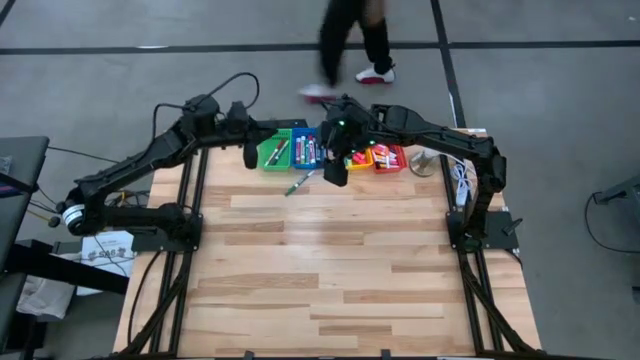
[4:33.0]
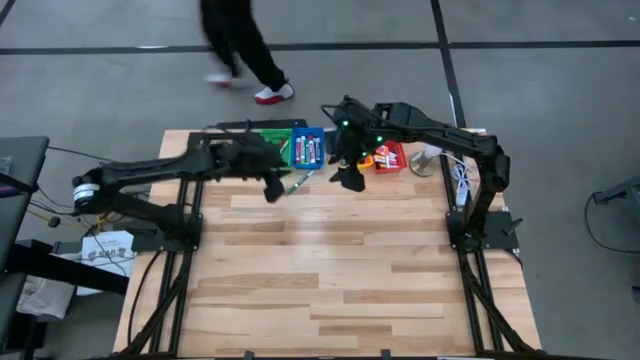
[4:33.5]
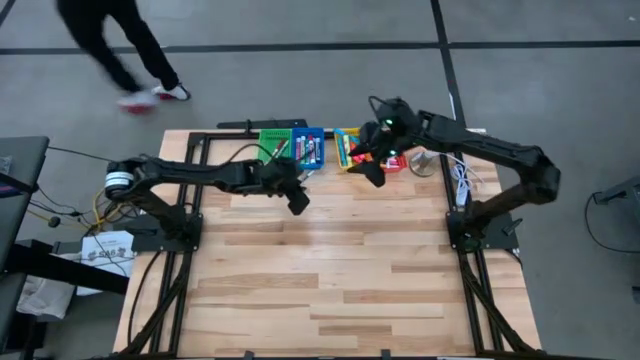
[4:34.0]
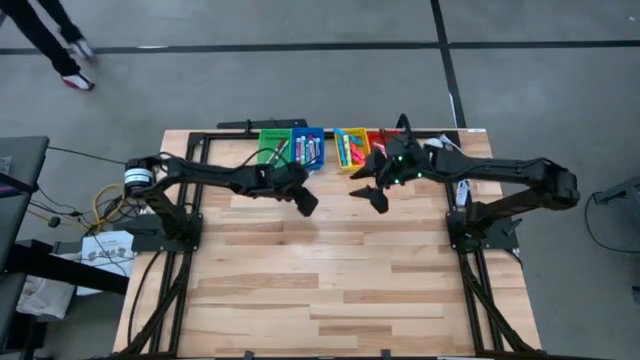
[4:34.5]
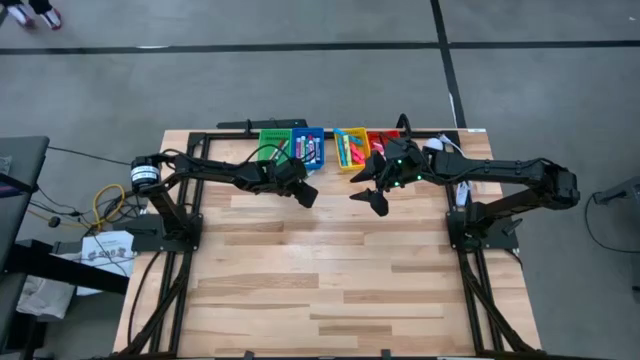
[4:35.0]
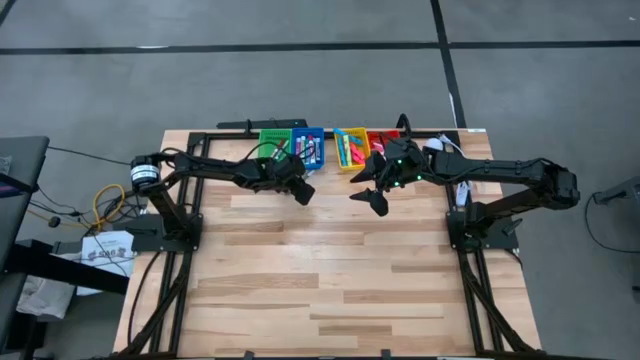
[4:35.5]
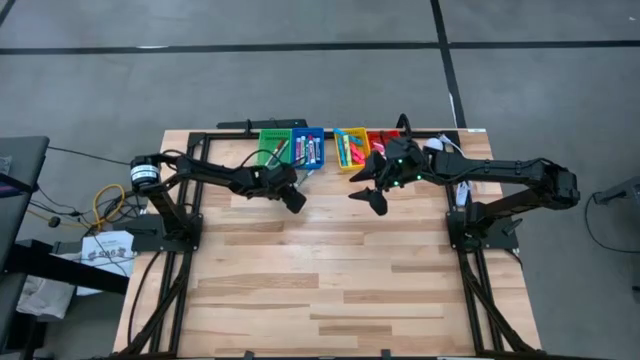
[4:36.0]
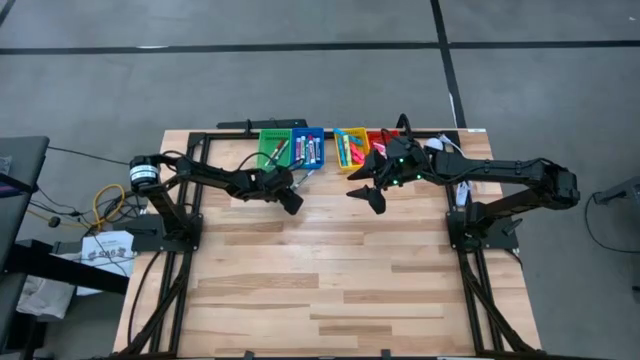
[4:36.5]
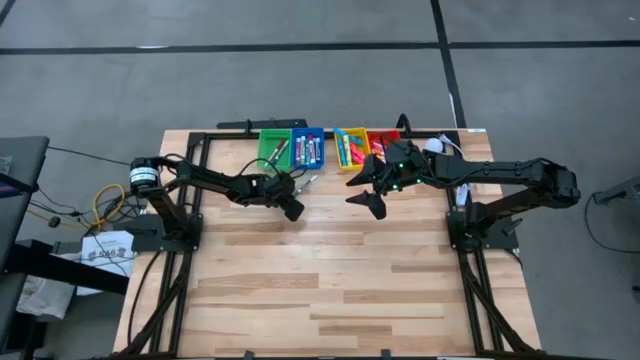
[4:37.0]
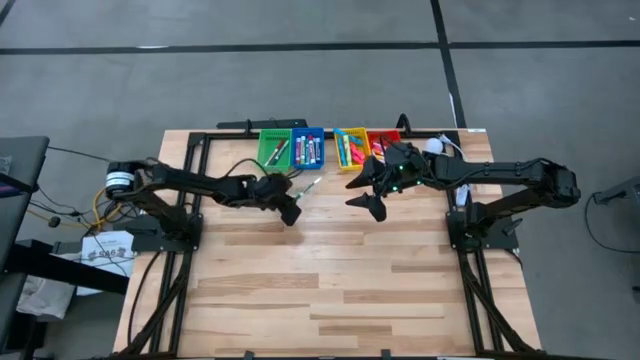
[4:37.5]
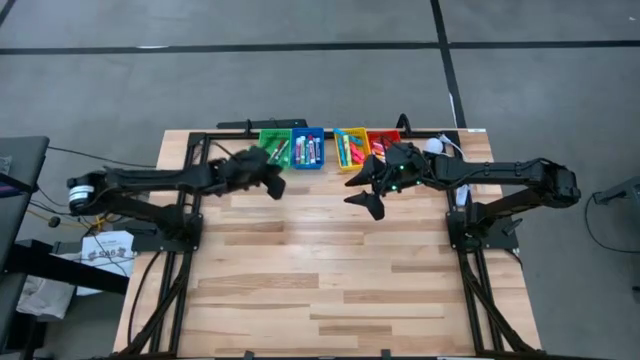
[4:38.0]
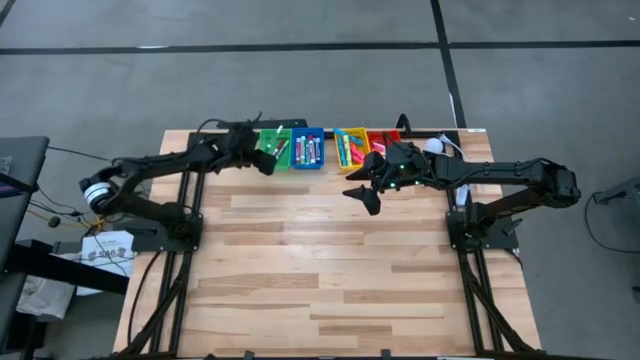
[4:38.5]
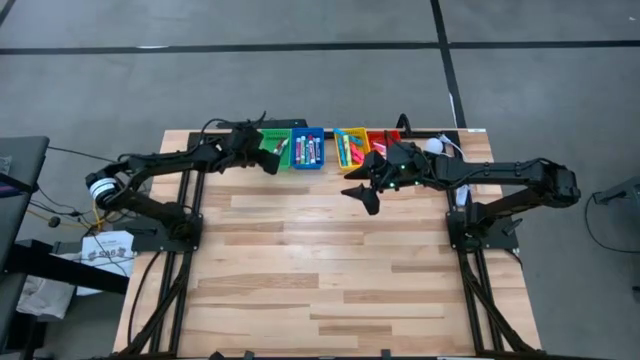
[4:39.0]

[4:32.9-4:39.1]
Task: Pick & Place Markers
Put the red dry erase marker into the green basket

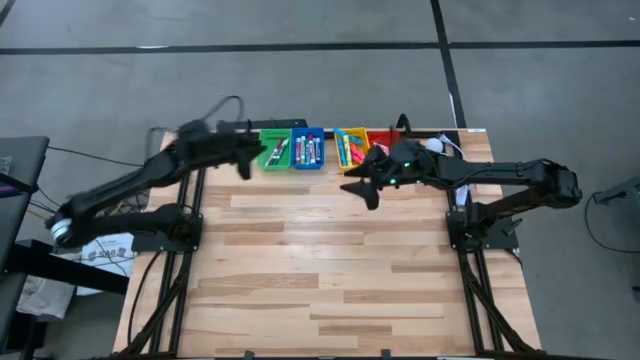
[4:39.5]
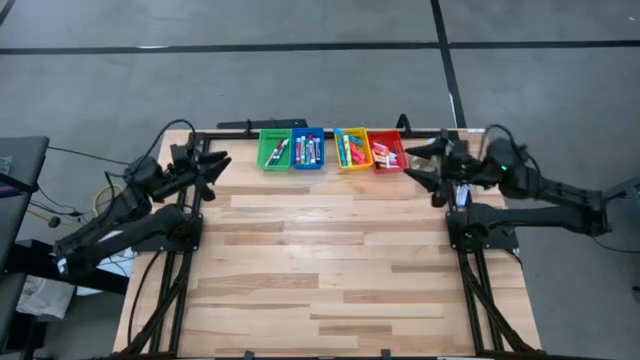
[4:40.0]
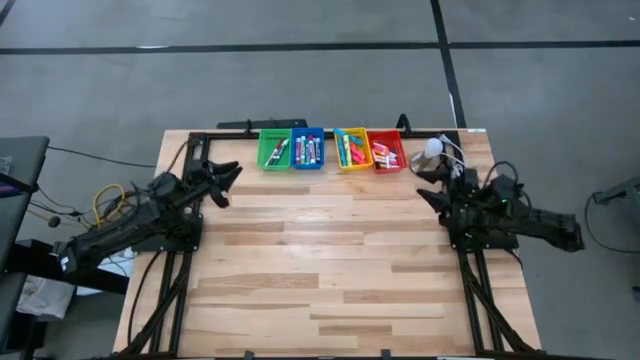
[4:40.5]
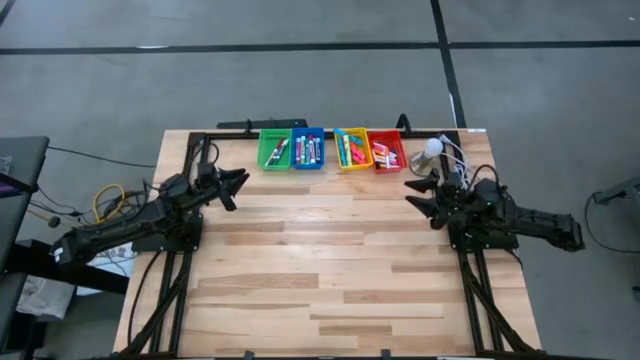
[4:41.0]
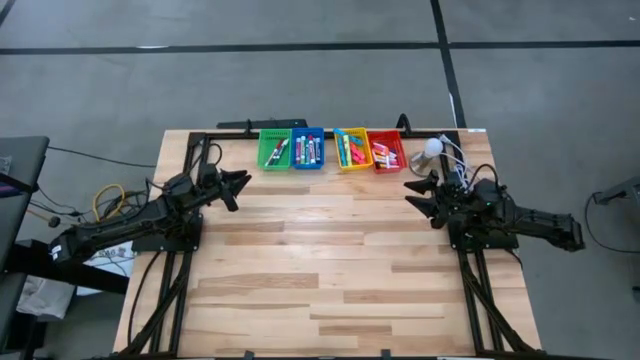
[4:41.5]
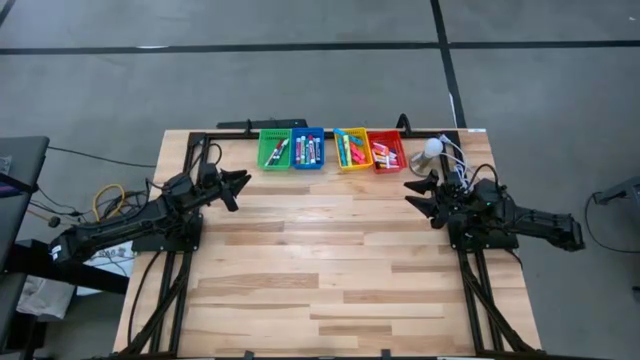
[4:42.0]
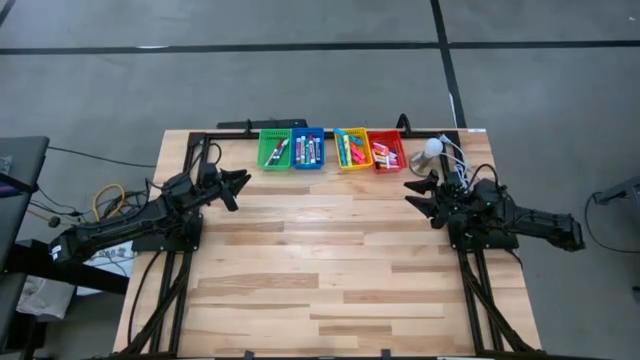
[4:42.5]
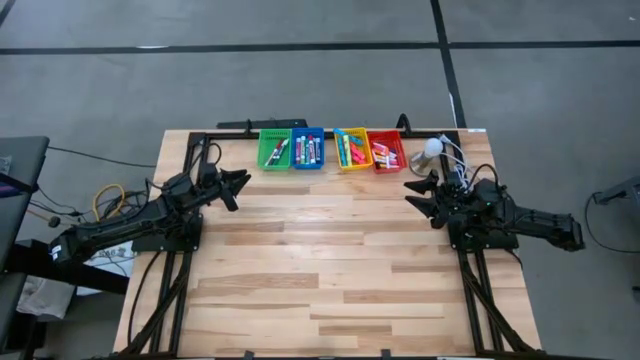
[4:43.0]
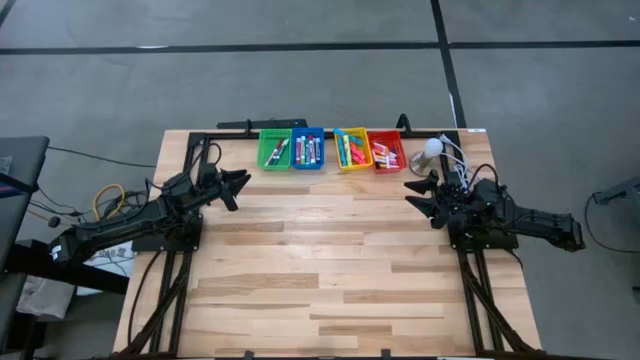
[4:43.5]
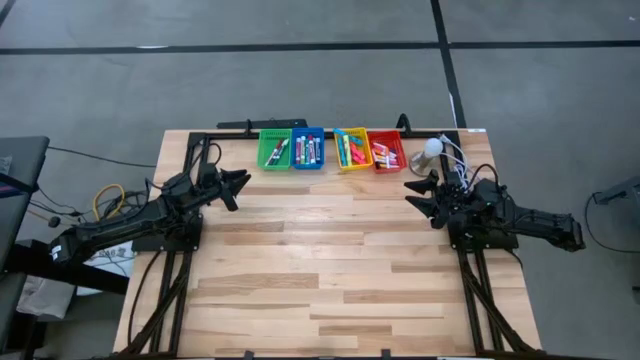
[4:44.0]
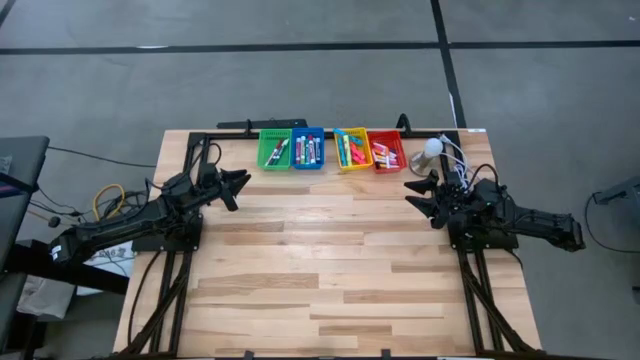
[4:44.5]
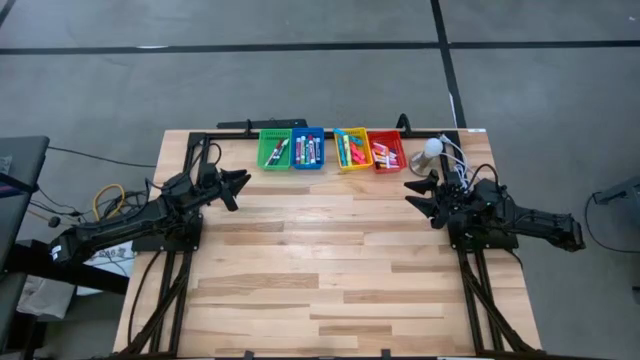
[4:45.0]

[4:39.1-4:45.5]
Return to Home Position

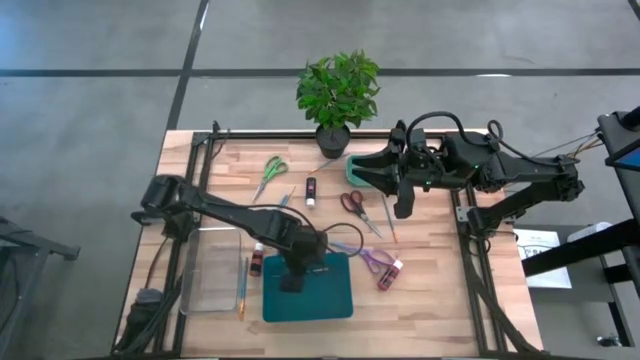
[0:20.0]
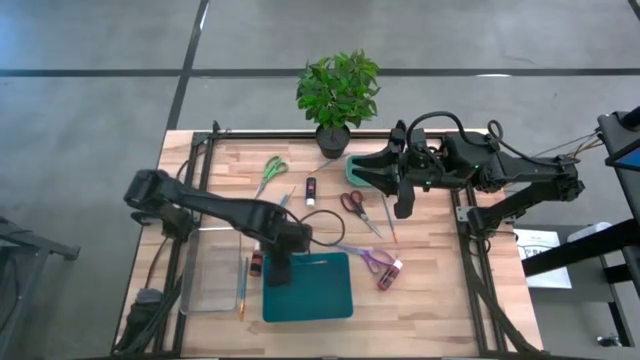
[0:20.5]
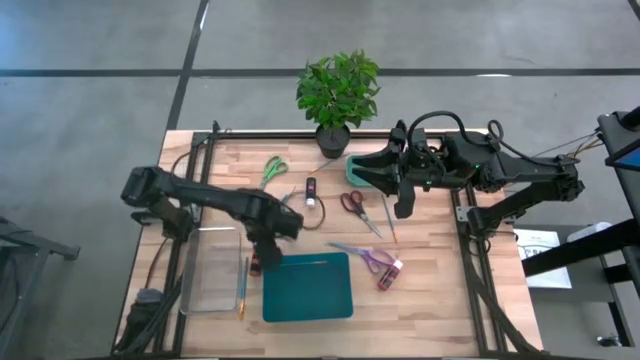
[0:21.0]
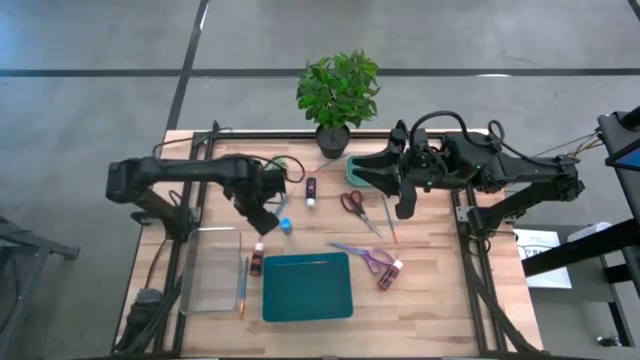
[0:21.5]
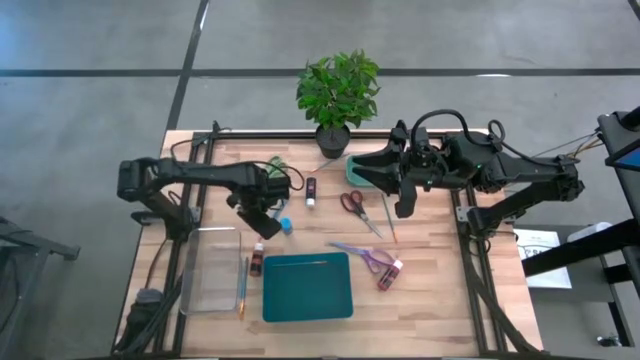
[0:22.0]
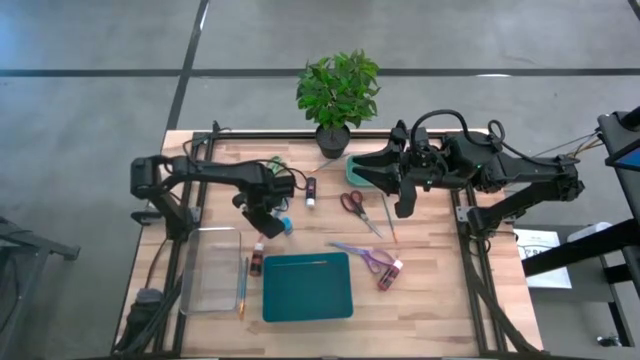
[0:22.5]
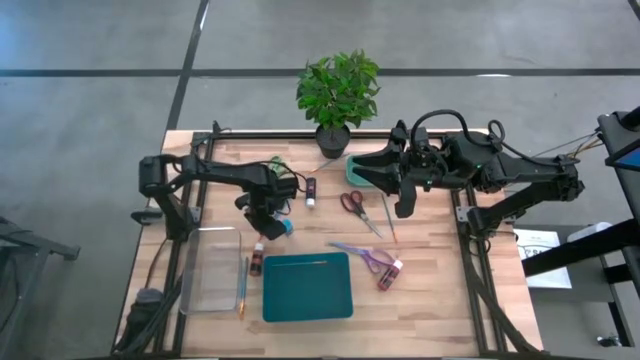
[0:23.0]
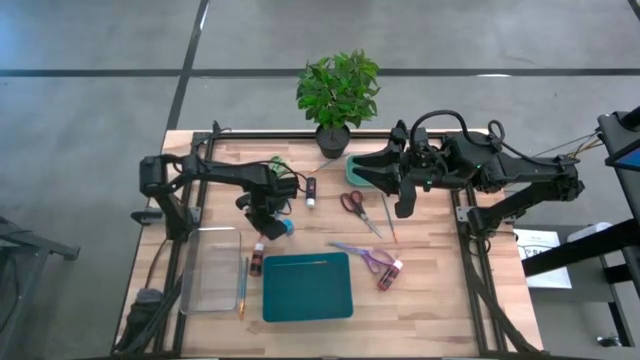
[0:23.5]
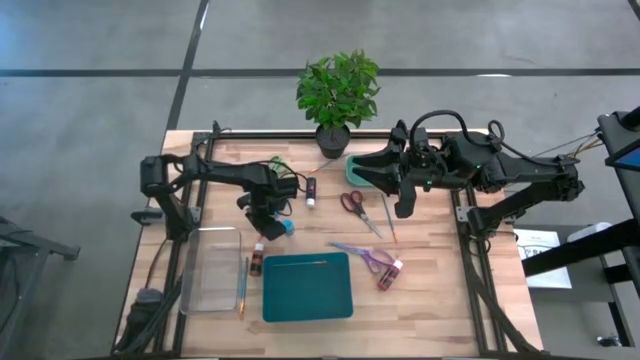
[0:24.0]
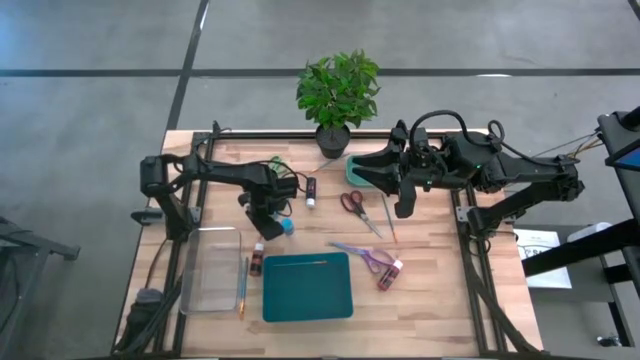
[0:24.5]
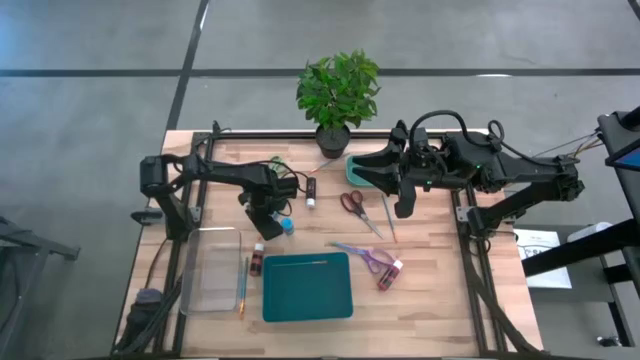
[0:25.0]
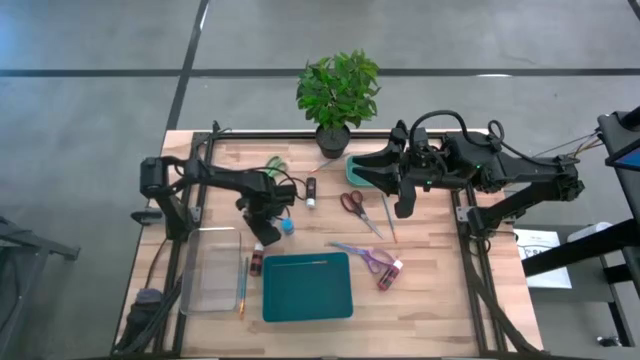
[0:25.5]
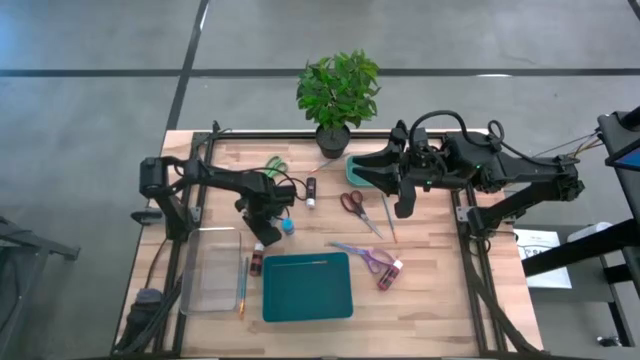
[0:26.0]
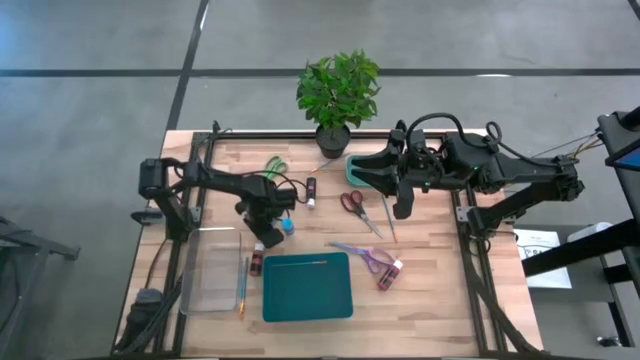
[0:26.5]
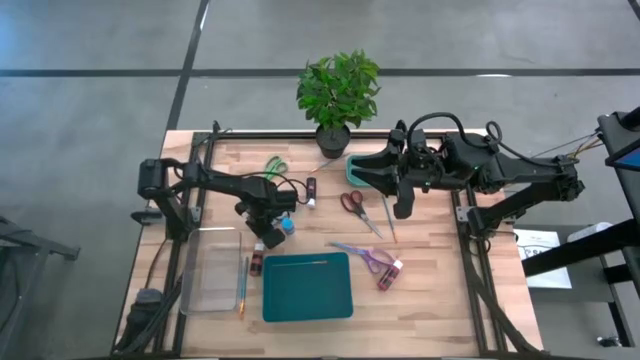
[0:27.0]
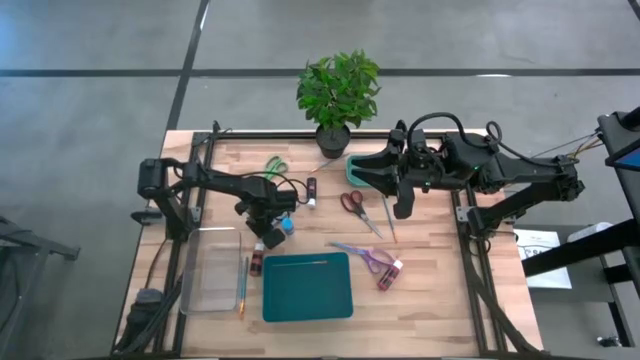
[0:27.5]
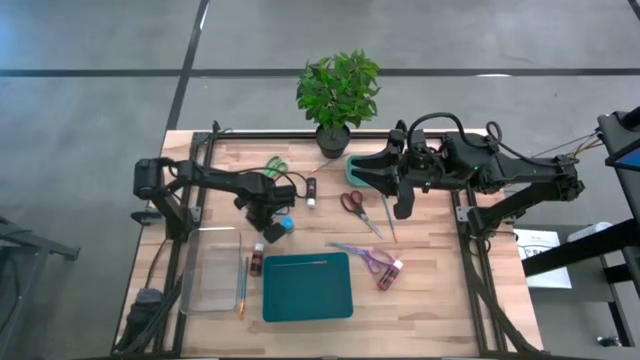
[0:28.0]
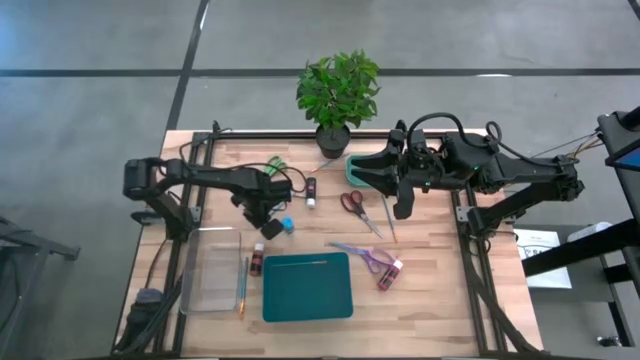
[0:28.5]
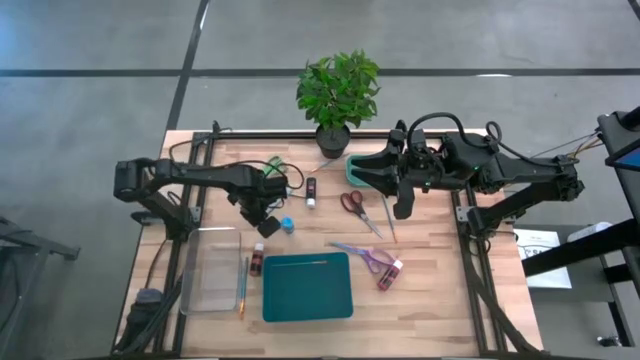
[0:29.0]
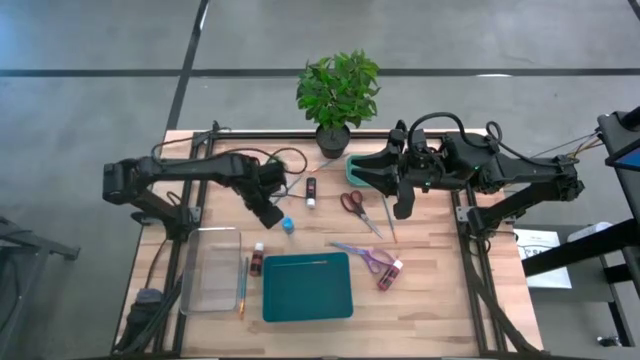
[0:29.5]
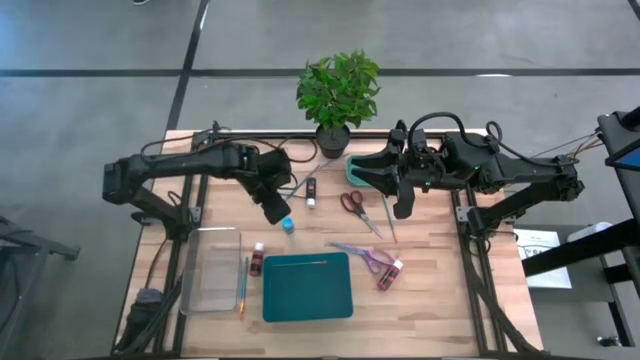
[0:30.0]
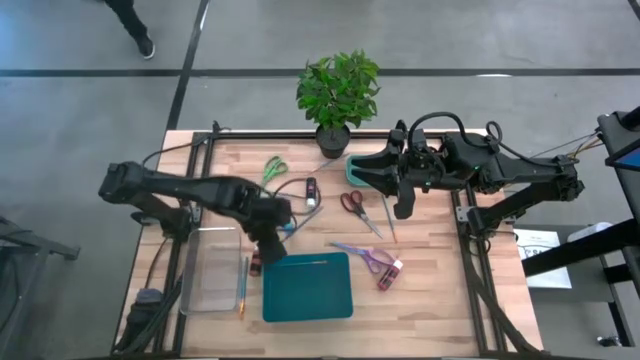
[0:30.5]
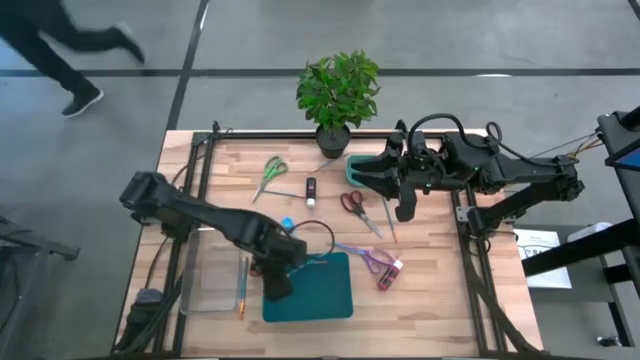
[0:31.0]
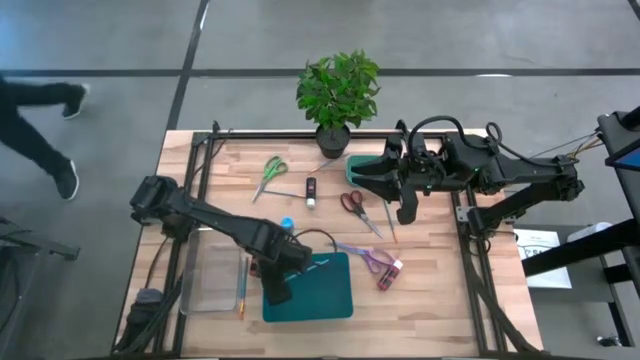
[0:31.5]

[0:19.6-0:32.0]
Task: Pick & Place Paint Supplies
Put the blue paint brush into the blue bin
